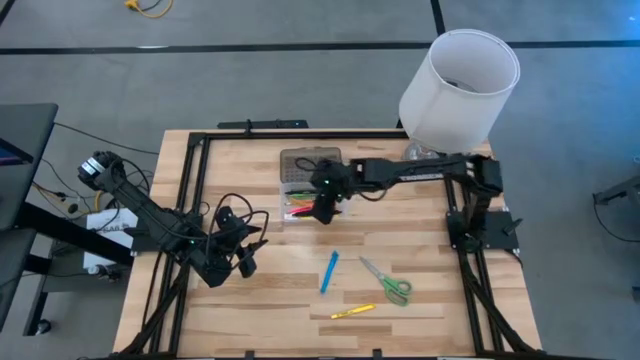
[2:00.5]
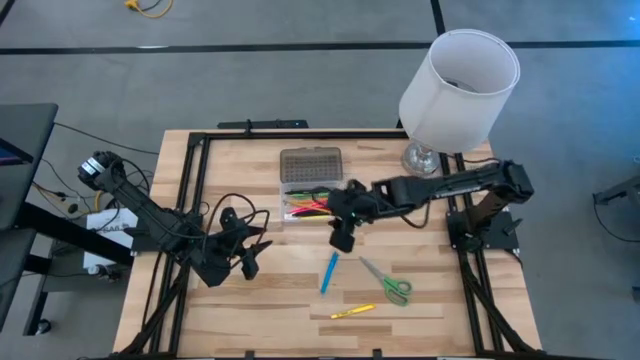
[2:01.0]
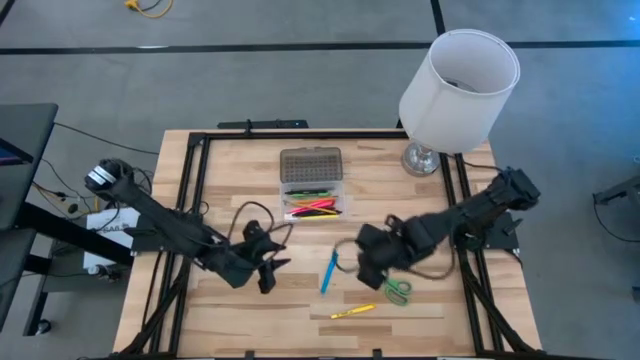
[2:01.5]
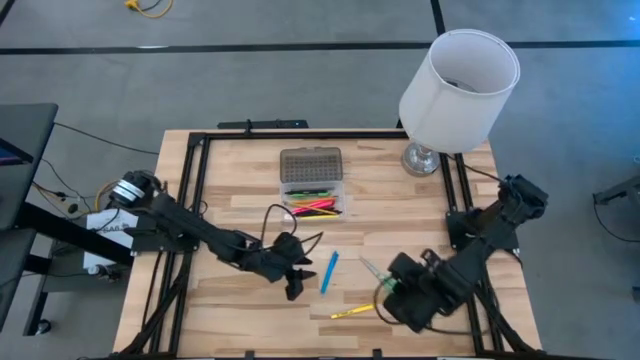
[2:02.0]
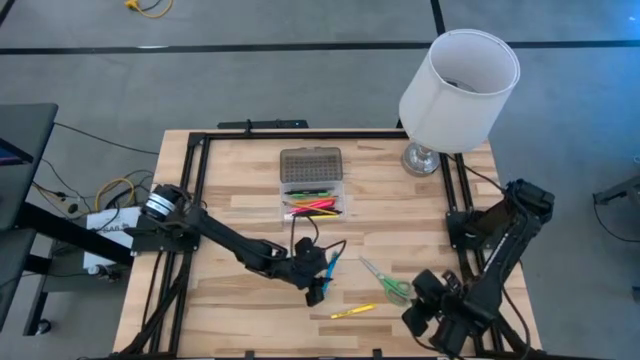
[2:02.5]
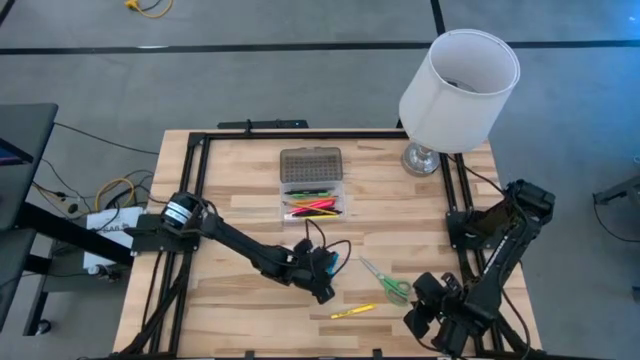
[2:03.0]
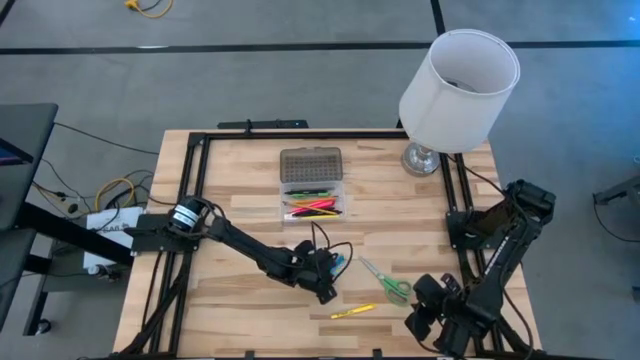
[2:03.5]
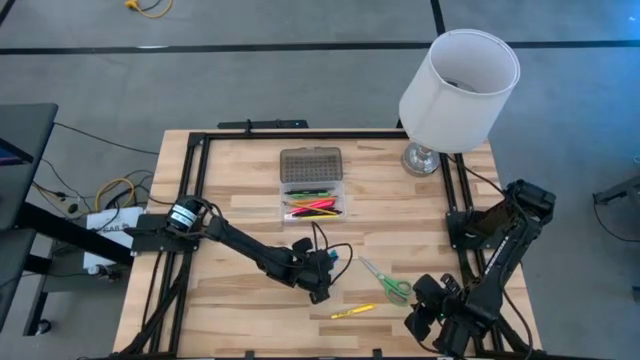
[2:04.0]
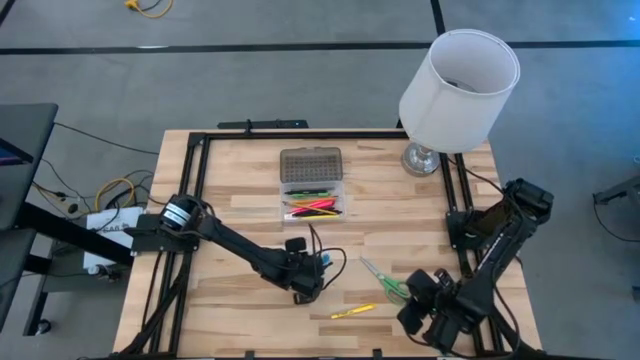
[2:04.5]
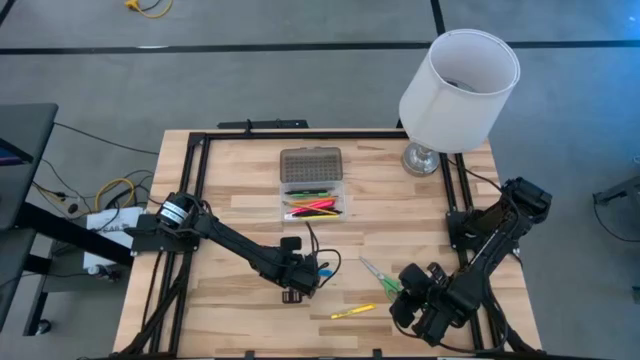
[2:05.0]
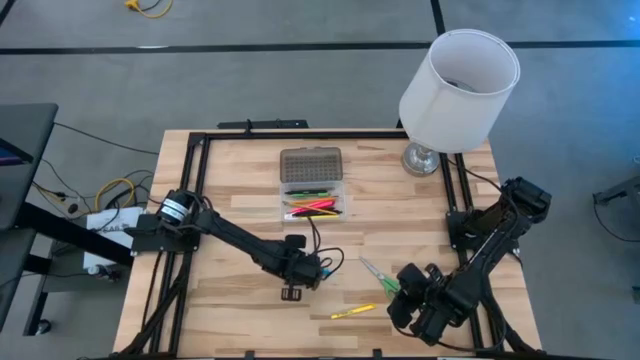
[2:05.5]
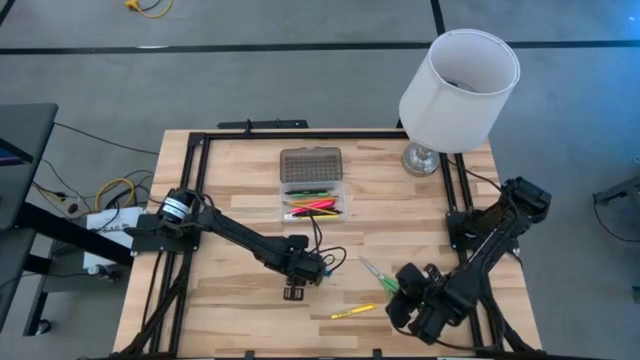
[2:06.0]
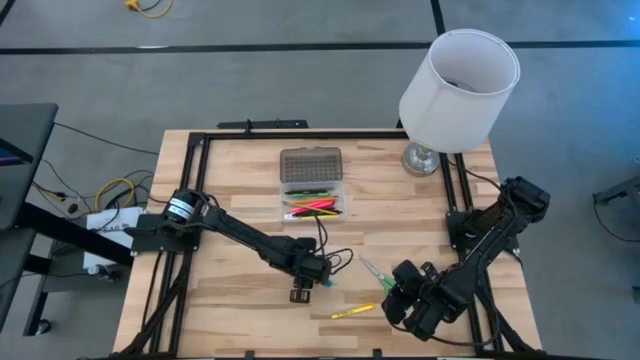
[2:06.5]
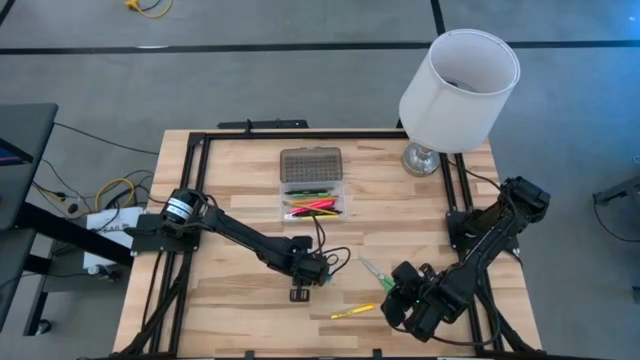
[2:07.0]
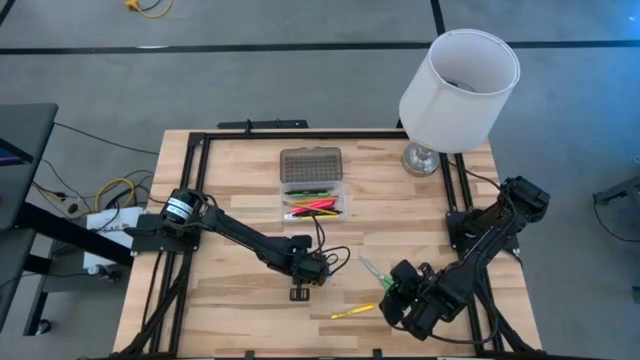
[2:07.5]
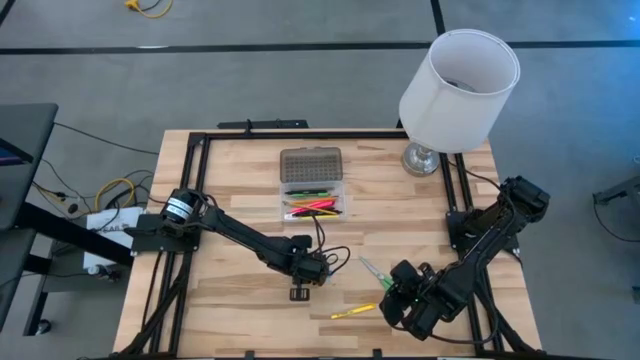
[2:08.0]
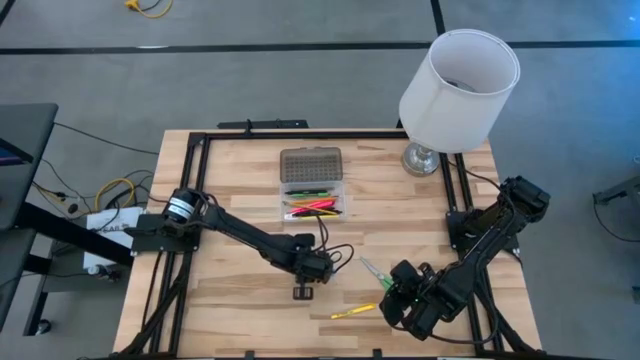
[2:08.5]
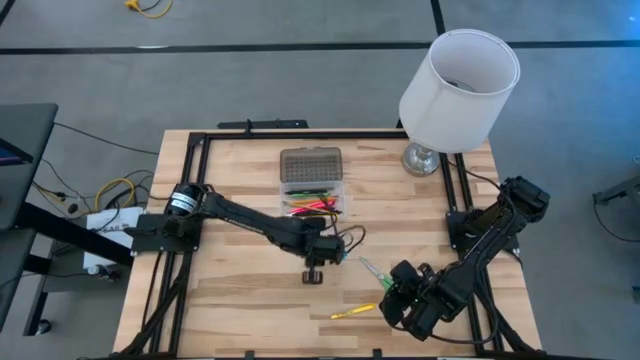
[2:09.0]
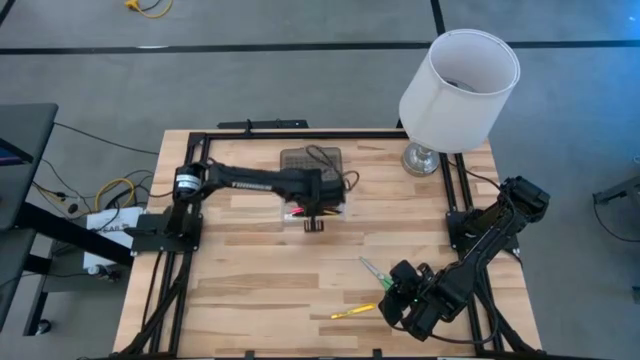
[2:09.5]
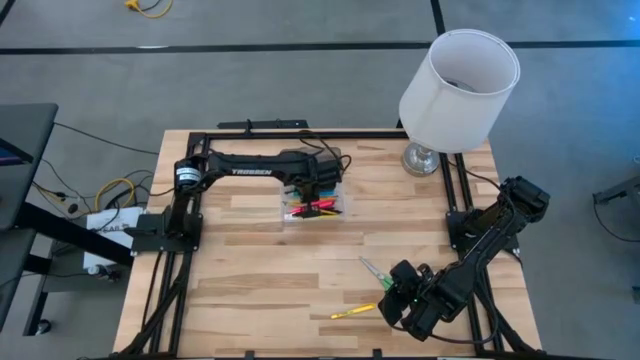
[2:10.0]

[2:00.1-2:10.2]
Task: Pick & place school supplies into a supply box
Put the blue pen into the supply box

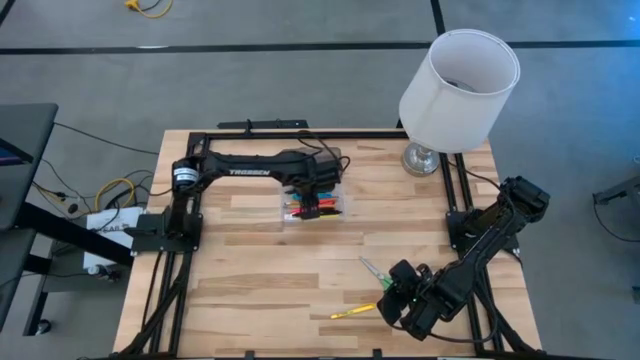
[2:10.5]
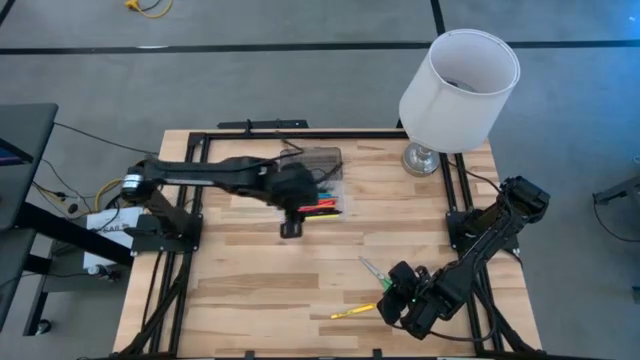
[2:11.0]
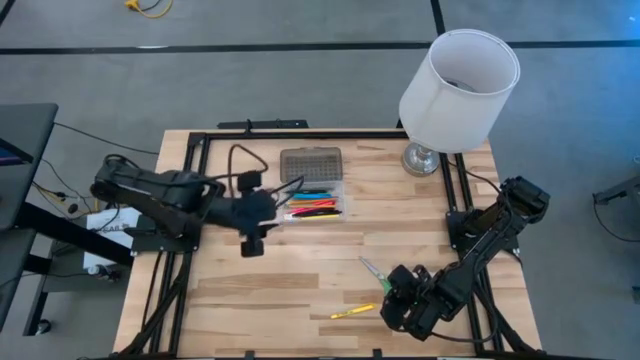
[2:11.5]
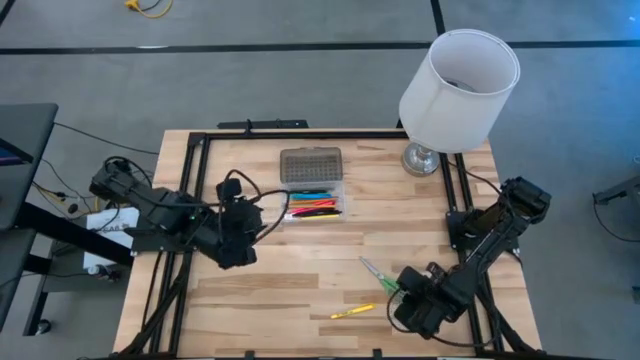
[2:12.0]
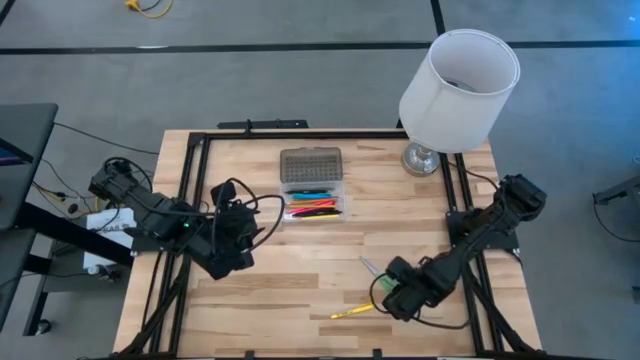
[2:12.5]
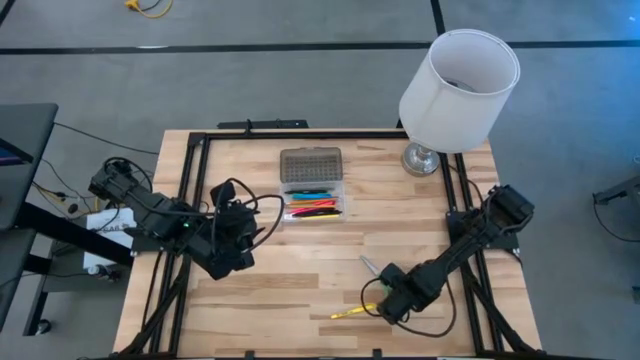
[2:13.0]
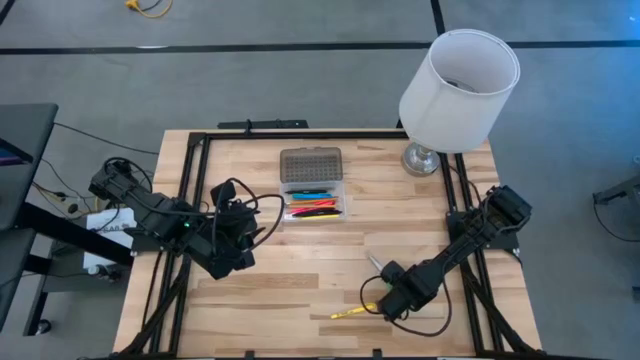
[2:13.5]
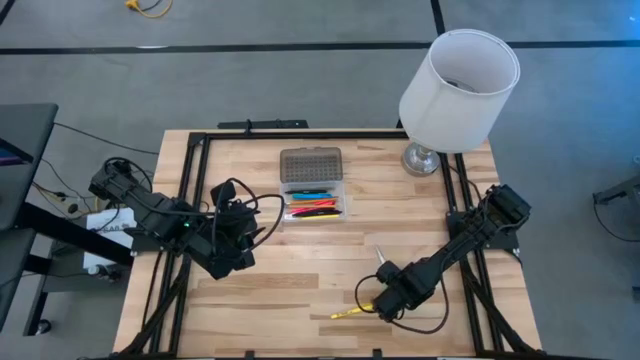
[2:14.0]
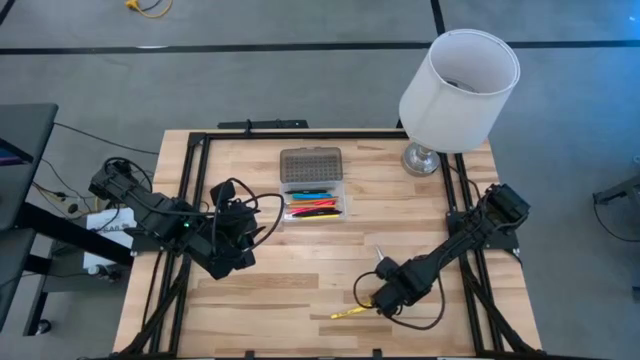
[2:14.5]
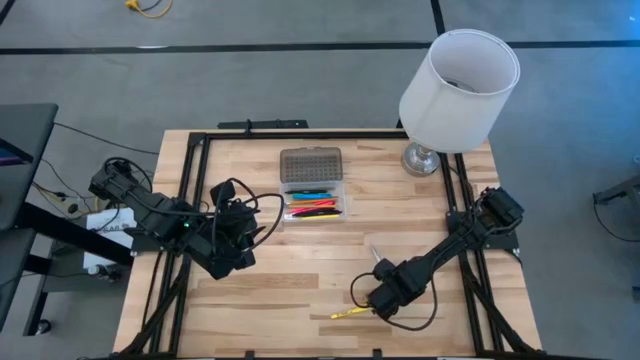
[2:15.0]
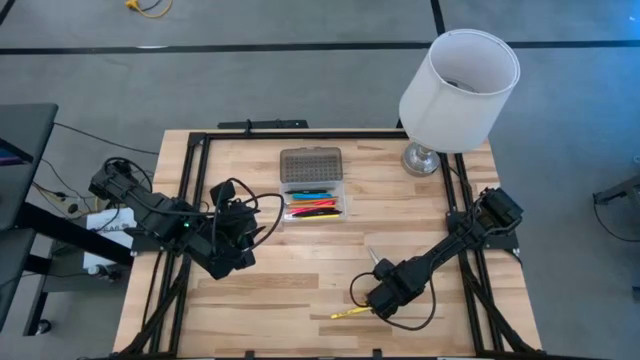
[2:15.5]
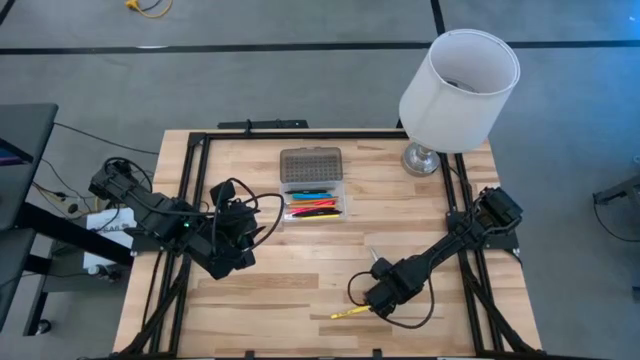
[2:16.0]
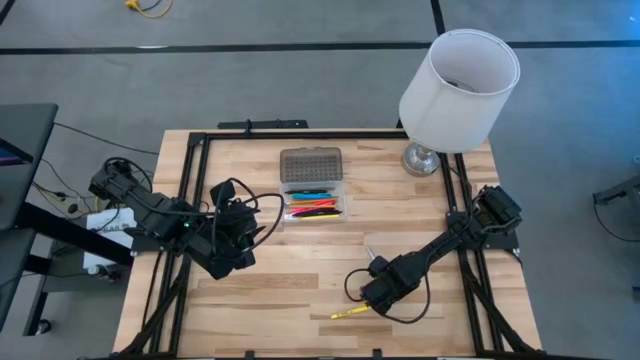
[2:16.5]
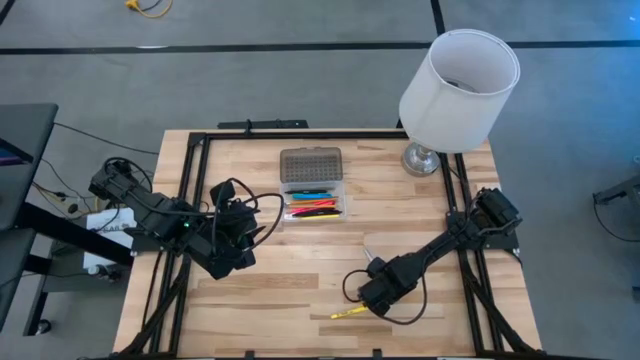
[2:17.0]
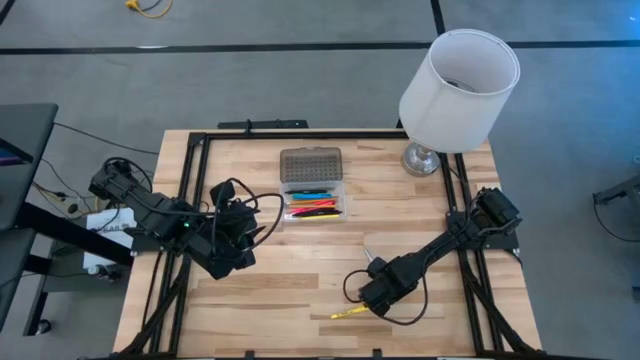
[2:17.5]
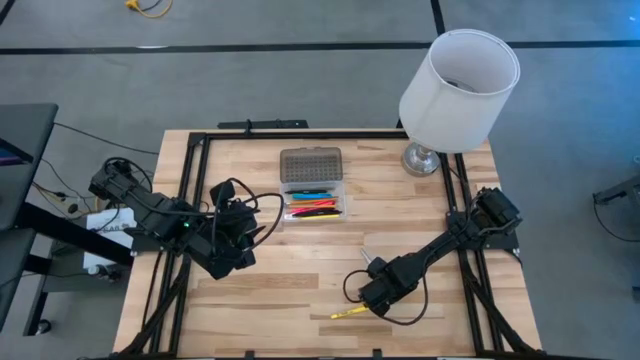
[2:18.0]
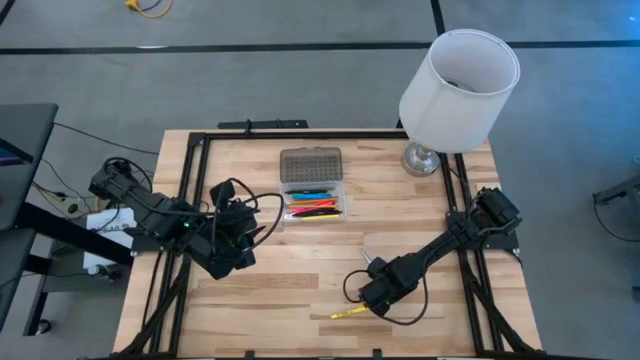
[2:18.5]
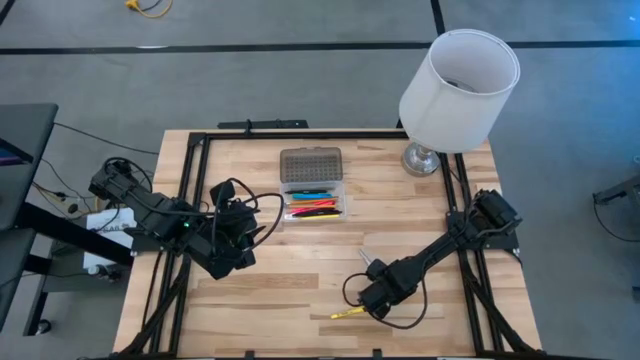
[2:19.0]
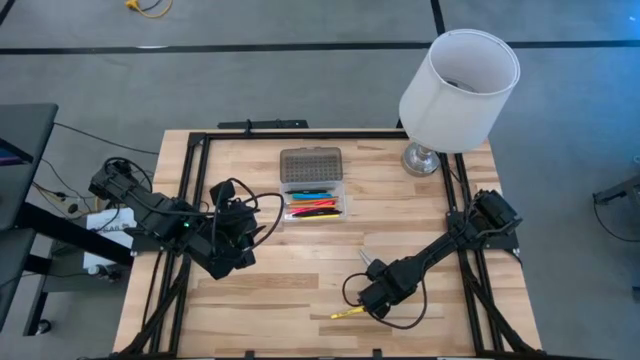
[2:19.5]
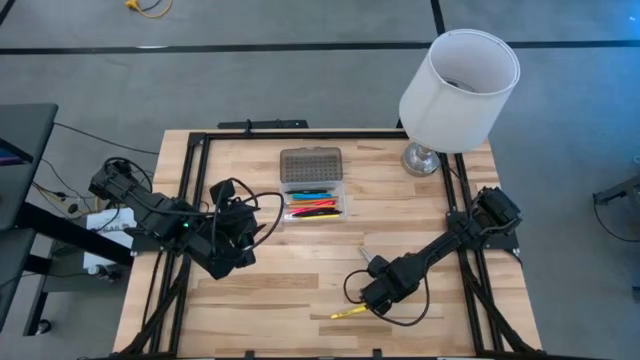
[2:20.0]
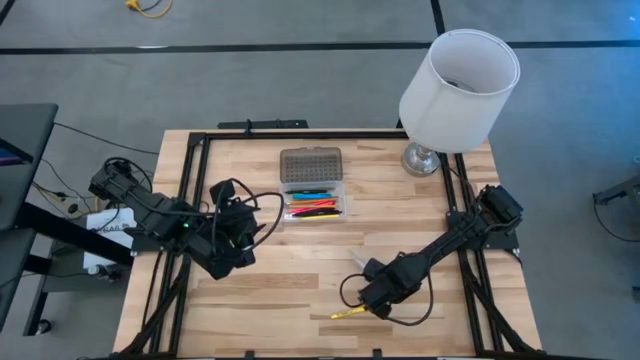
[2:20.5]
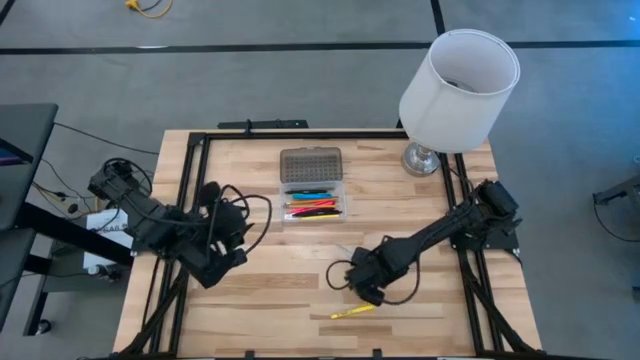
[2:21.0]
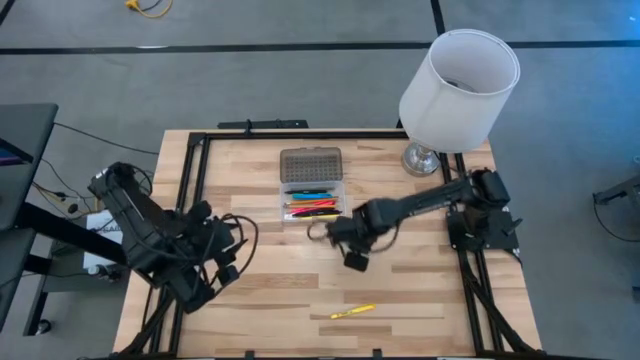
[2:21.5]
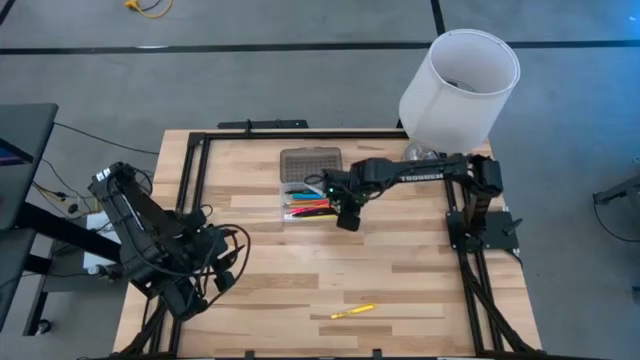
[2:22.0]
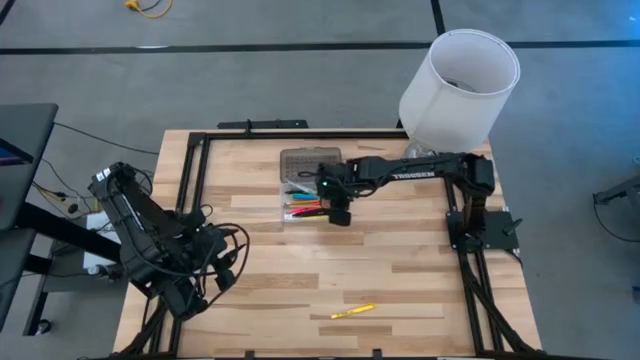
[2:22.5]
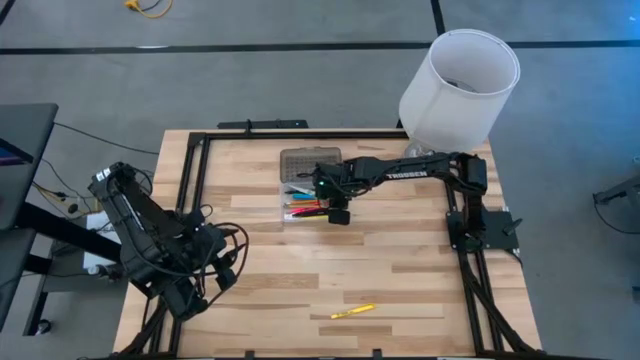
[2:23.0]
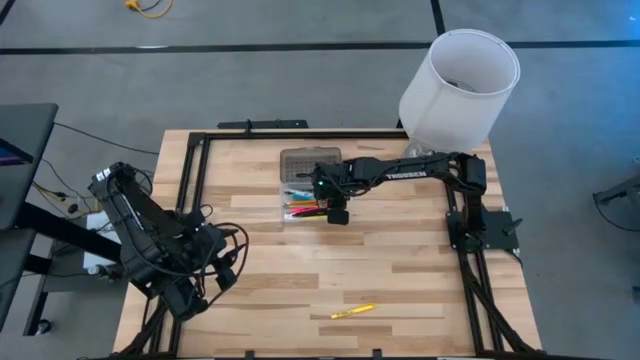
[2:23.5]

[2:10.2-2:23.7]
Put the scissors into the supply box
